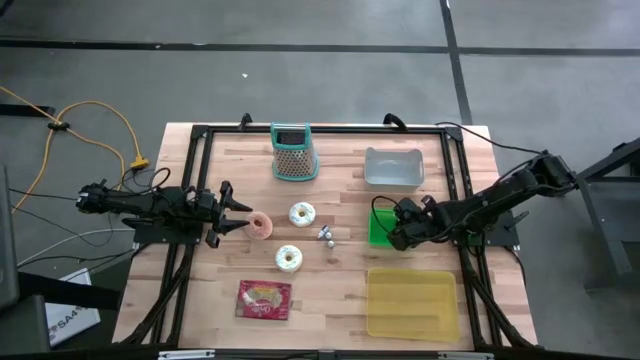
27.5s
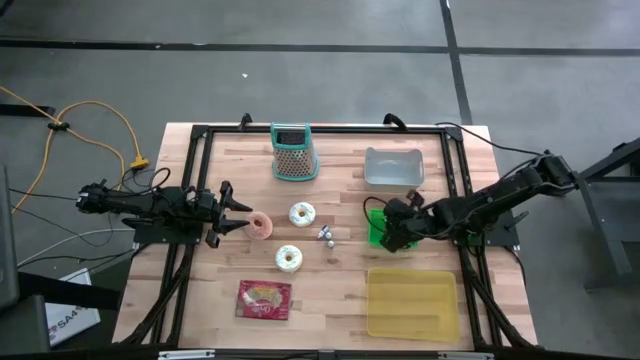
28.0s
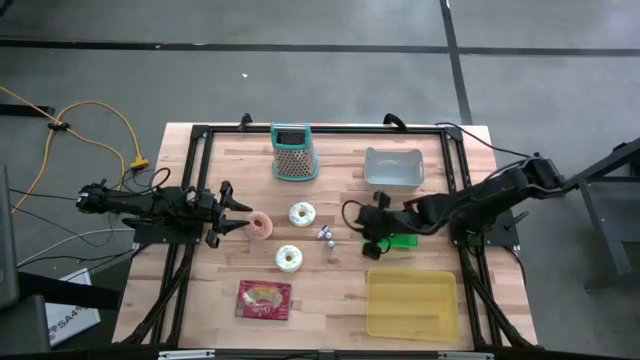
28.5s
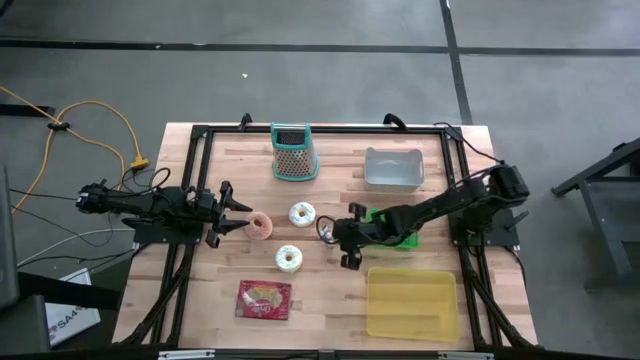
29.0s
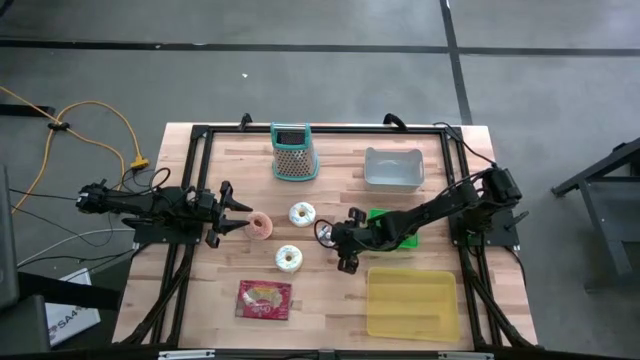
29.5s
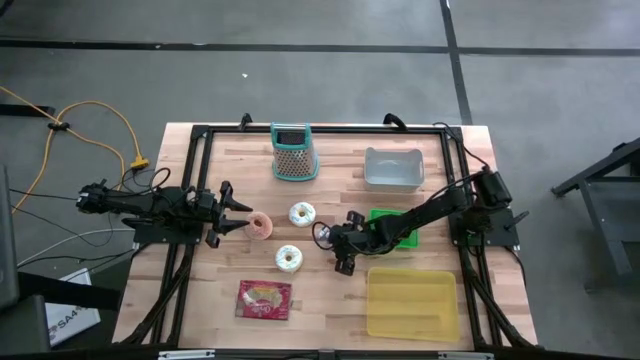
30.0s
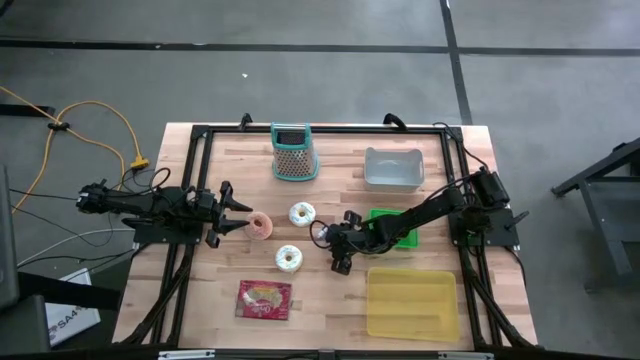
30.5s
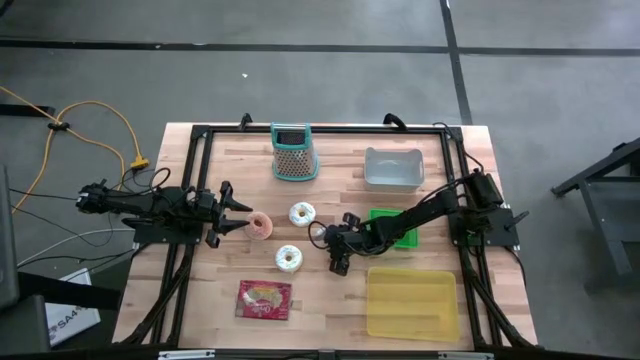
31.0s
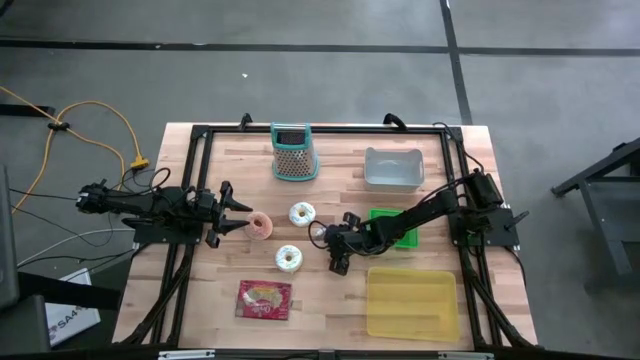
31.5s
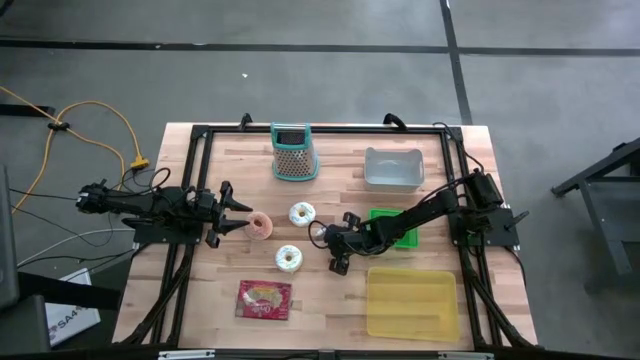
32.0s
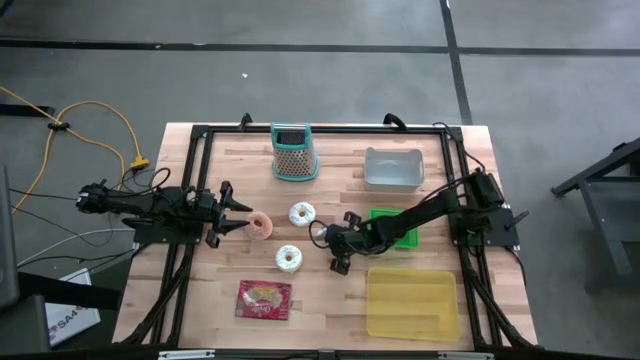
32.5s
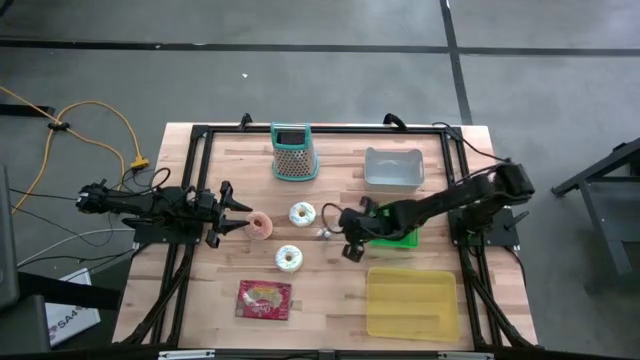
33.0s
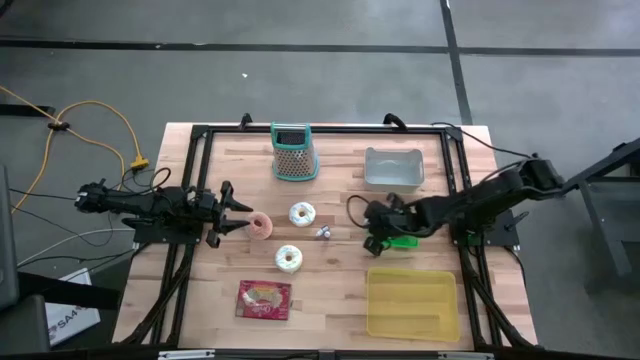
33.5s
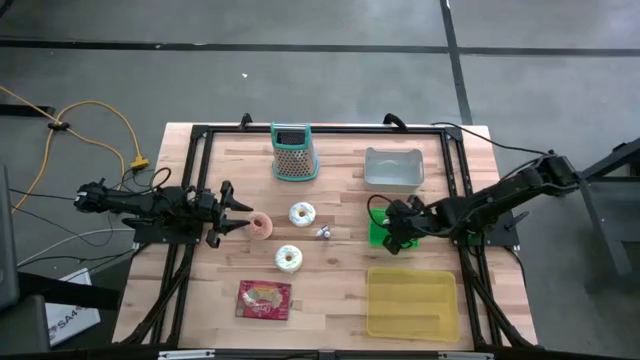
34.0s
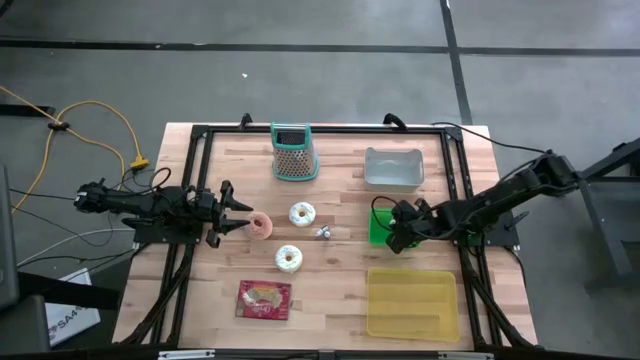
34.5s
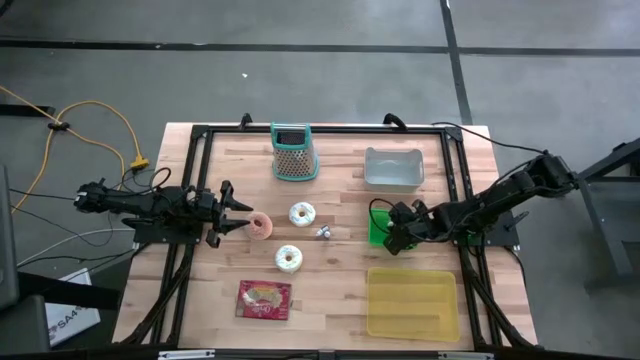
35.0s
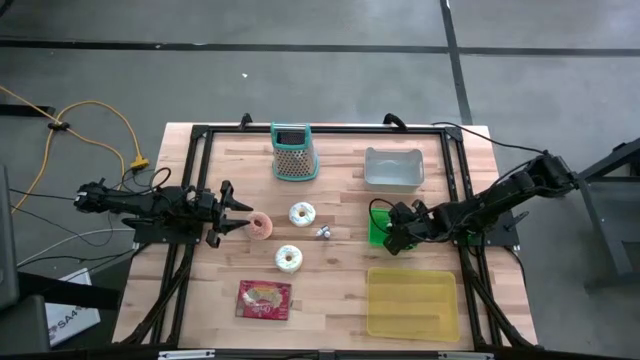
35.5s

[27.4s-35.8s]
Put the blue food coloring bottle into the green bin

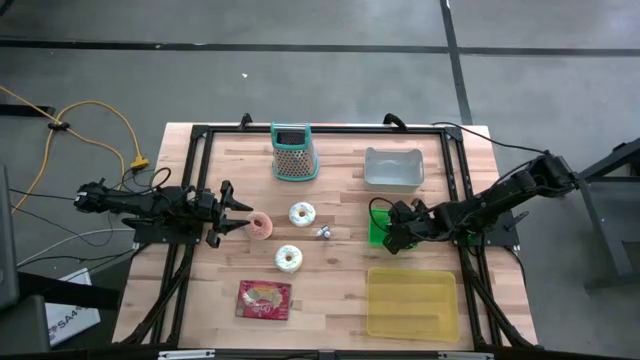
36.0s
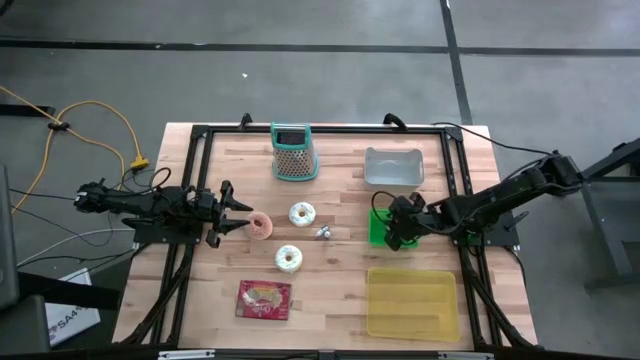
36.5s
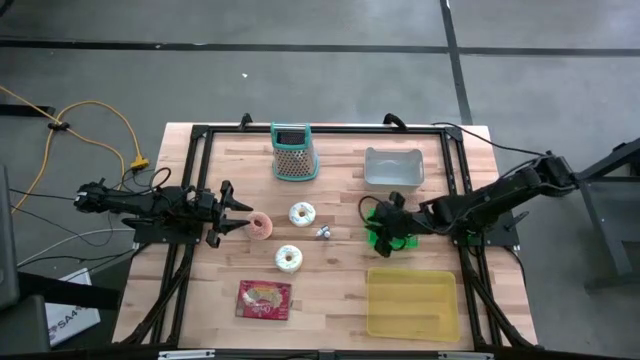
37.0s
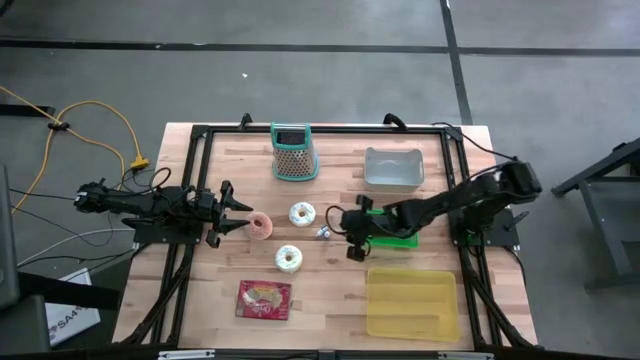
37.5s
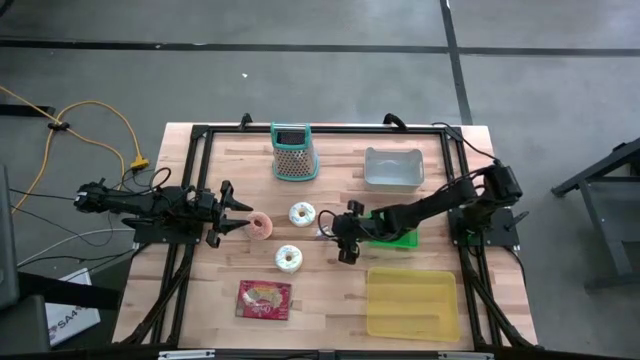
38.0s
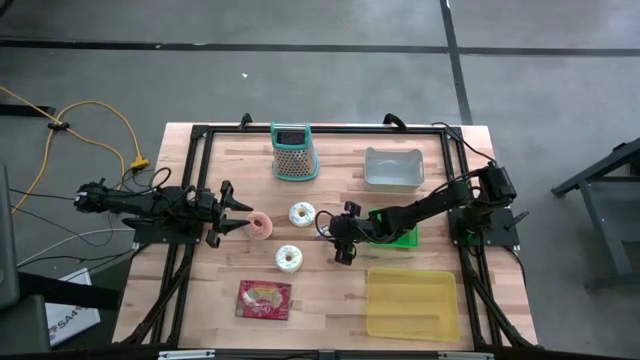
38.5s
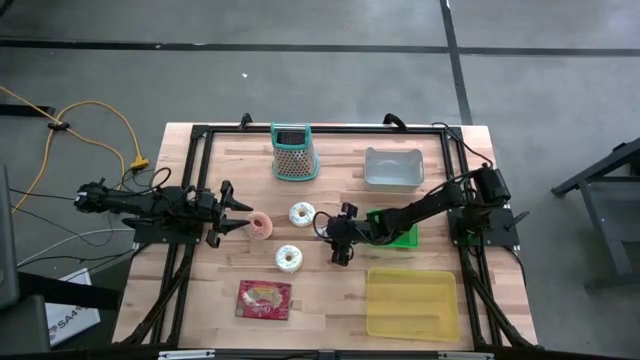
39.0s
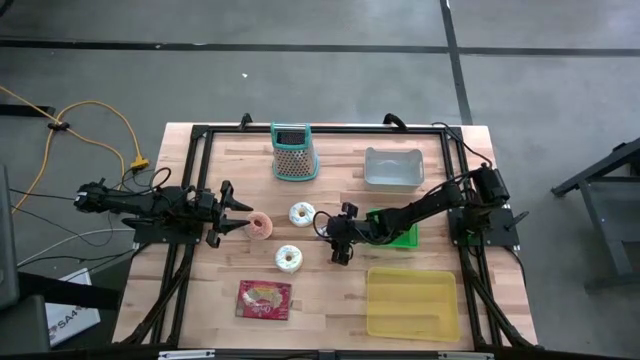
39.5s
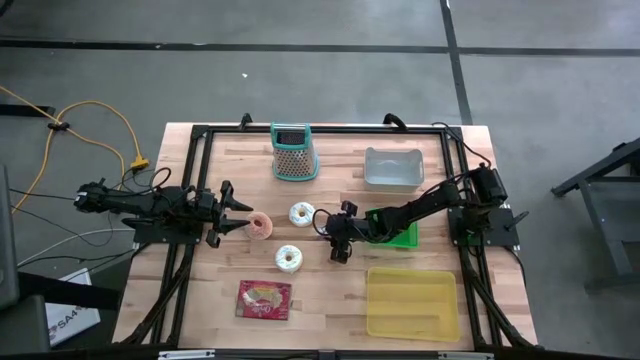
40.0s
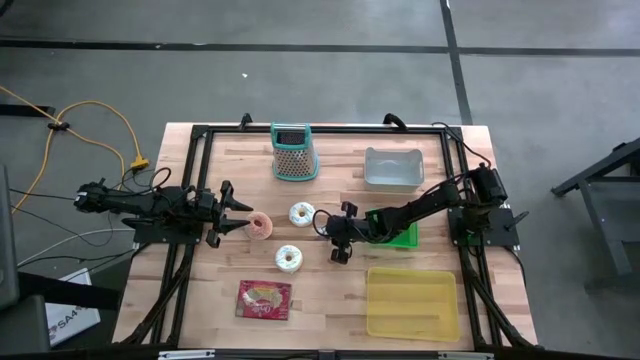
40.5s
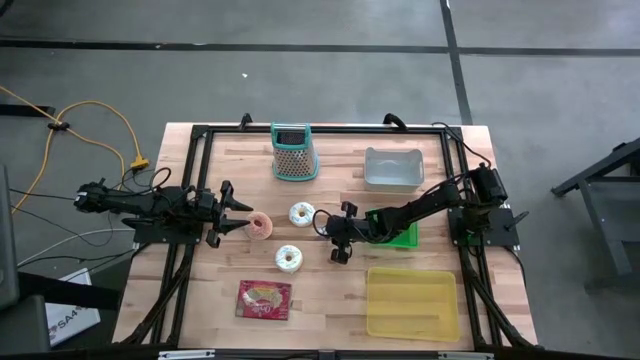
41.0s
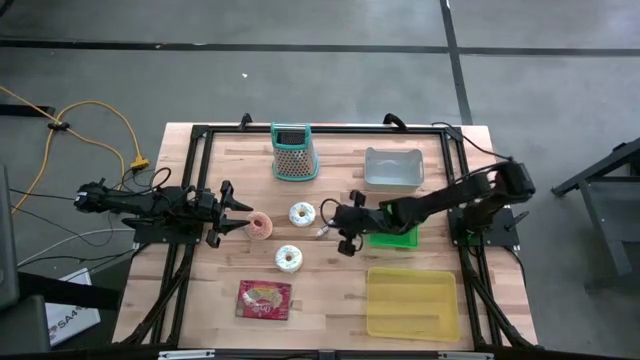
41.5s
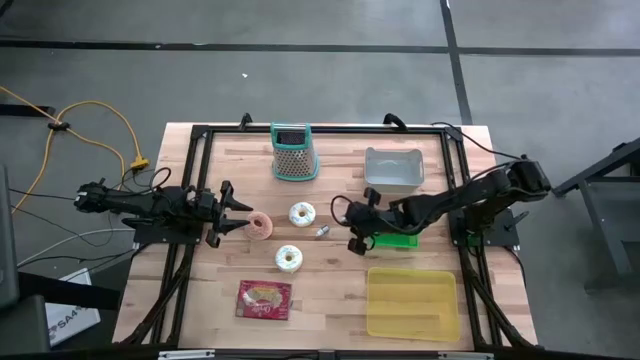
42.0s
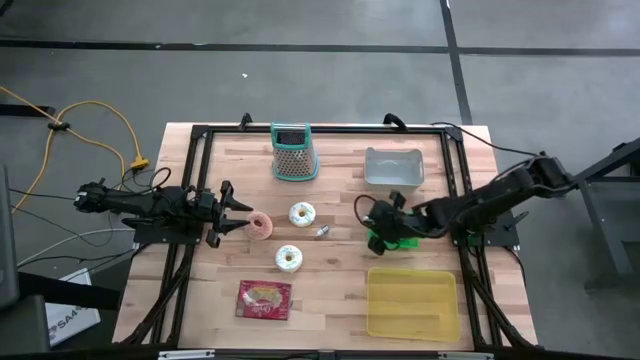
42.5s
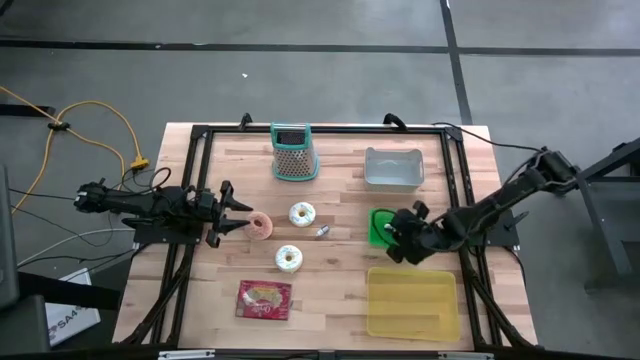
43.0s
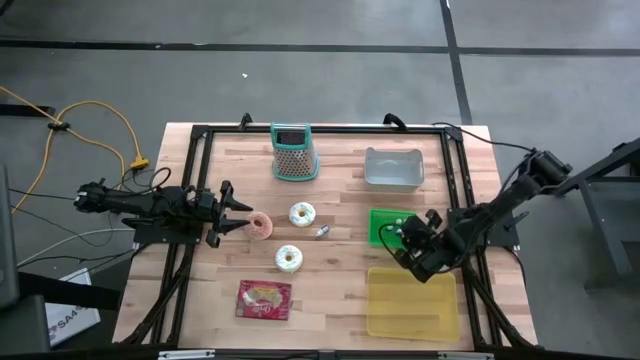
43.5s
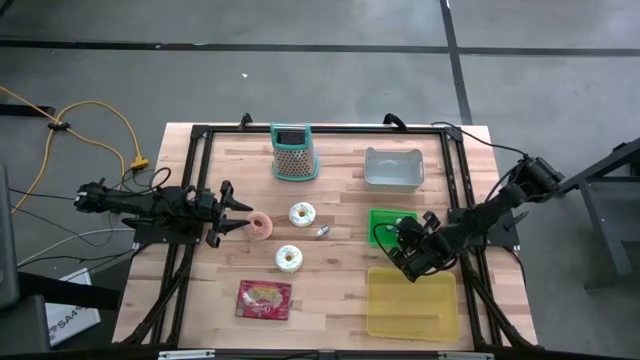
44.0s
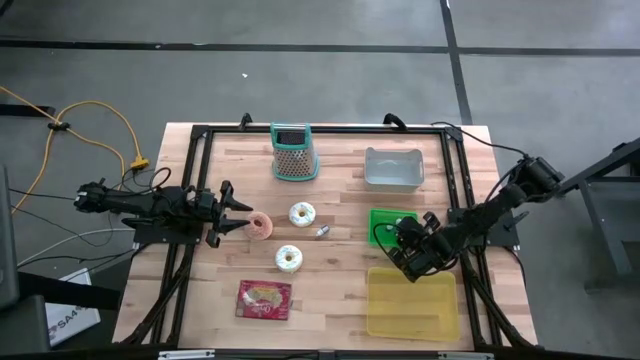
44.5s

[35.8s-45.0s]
Put the purple food coloring bottle into the green bin
